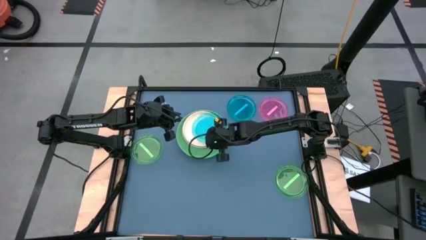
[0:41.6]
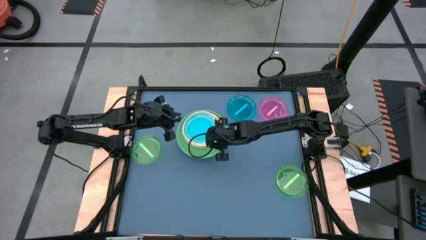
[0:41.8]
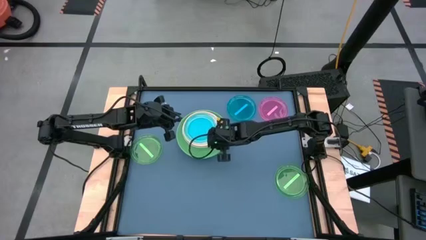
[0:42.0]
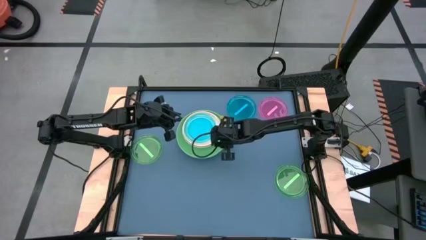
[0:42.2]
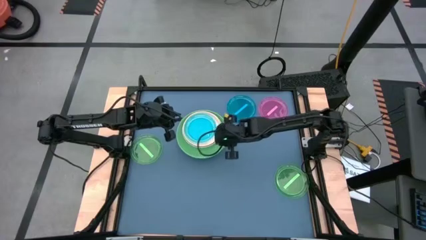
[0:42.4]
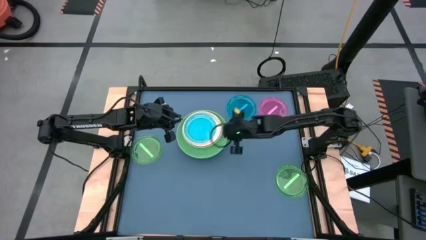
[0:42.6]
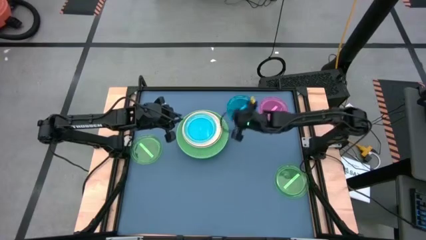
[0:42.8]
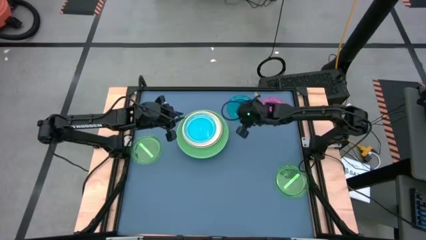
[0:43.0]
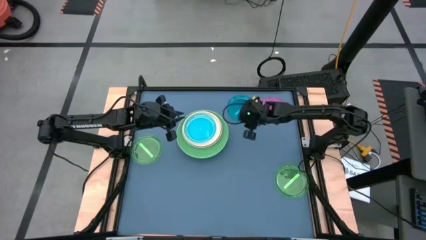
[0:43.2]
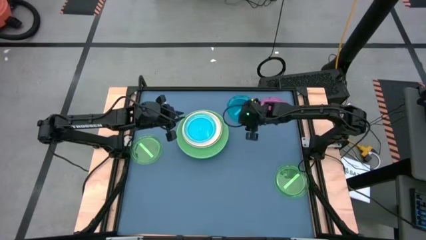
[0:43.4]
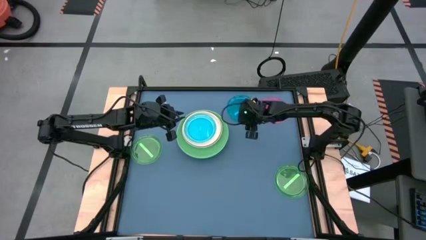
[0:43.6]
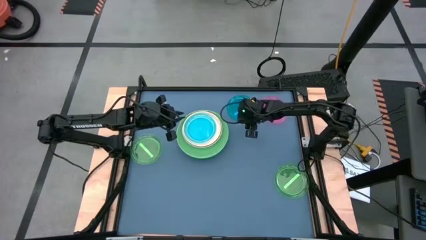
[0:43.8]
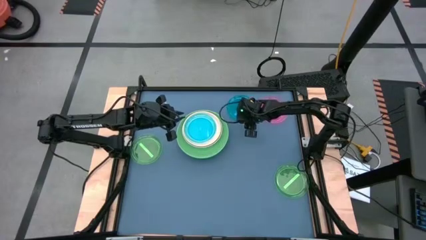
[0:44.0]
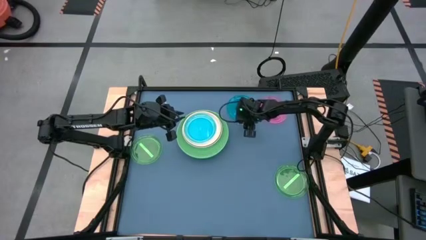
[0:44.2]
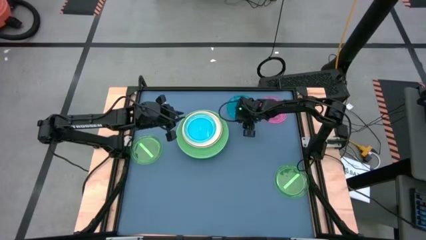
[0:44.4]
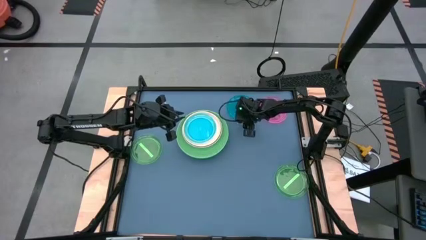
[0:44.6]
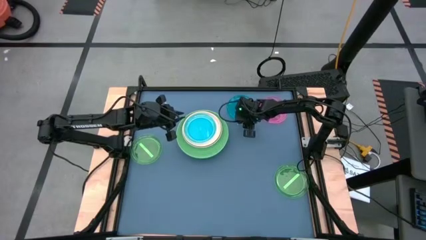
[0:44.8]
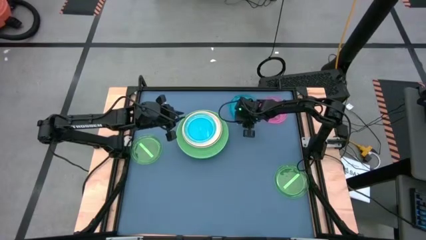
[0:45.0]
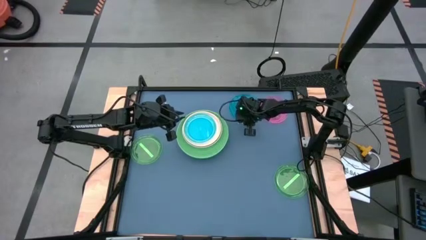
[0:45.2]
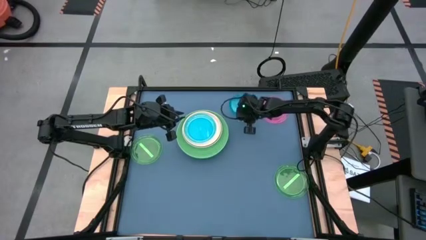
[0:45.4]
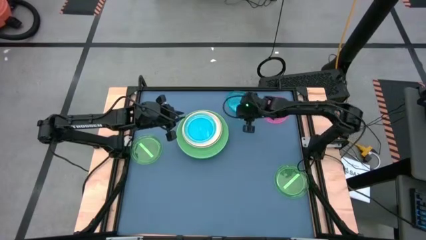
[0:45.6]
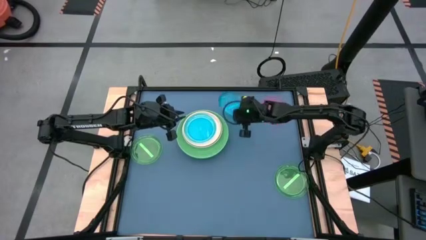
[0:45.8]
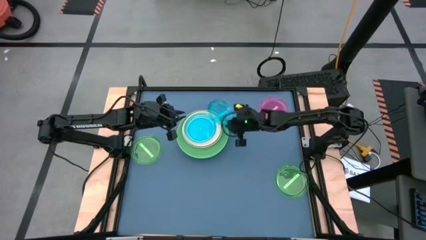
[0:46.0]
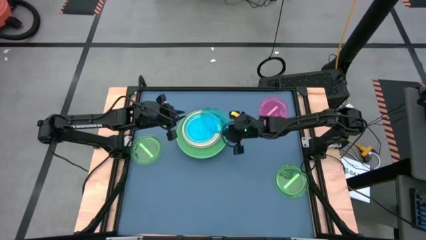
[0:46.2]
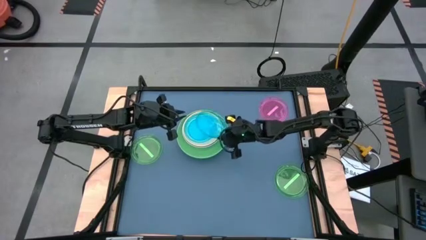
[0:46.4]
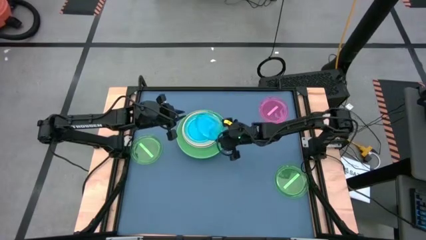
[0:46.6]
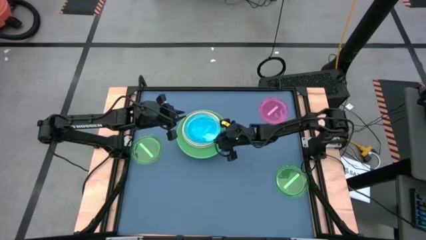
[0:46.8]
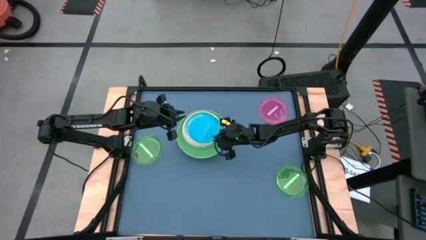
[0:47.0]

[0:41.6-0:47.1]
Task: Stack plastic plates
Stack the blue plate on top of the blue plate

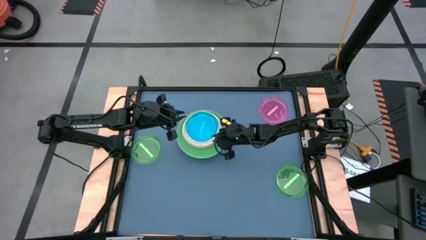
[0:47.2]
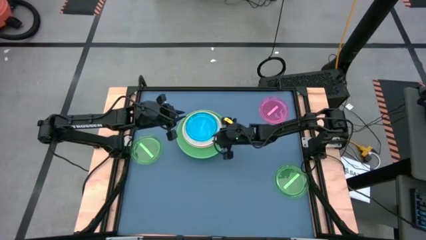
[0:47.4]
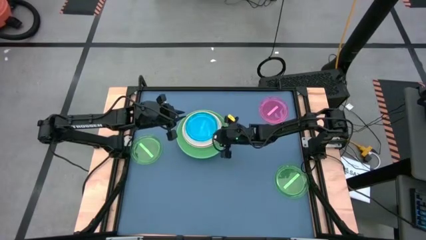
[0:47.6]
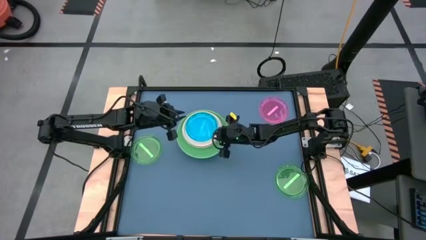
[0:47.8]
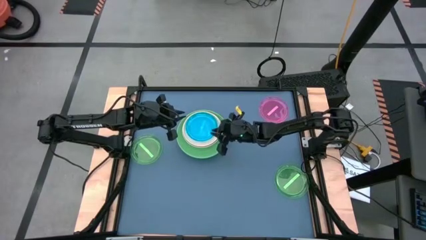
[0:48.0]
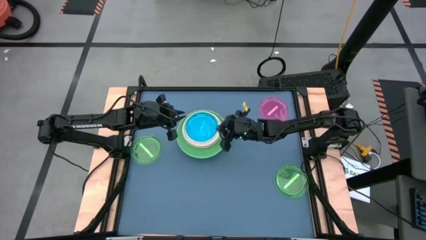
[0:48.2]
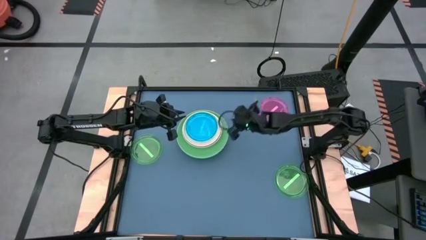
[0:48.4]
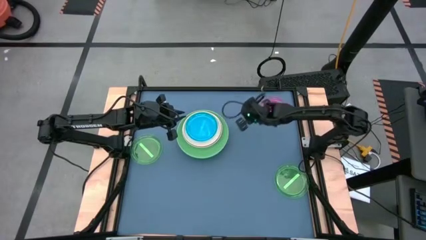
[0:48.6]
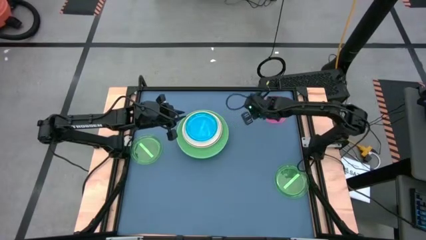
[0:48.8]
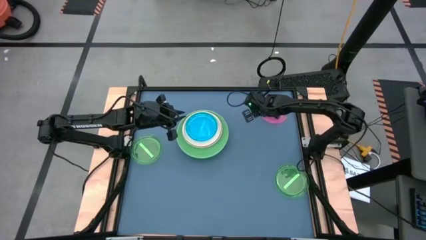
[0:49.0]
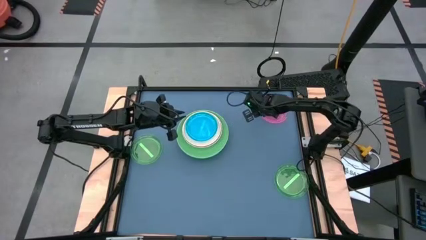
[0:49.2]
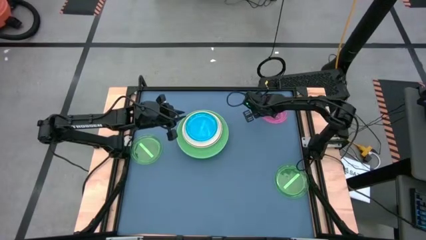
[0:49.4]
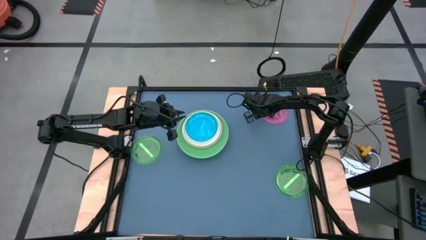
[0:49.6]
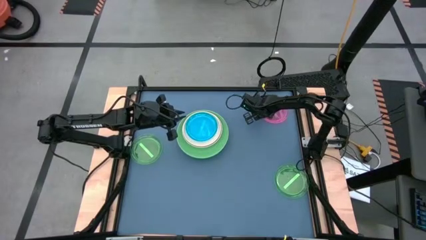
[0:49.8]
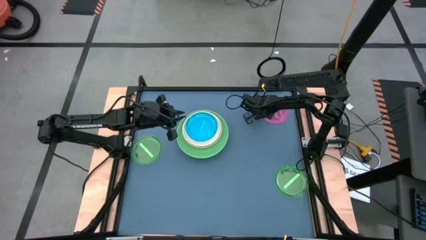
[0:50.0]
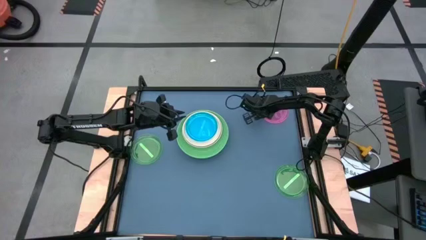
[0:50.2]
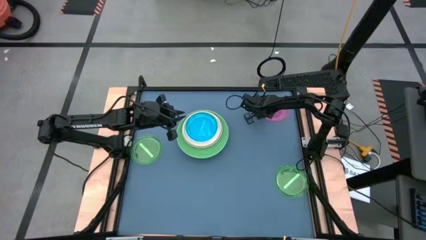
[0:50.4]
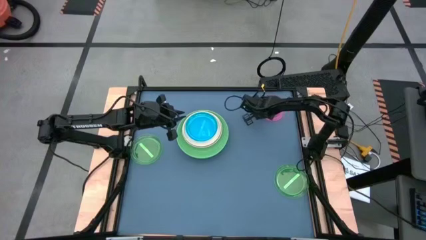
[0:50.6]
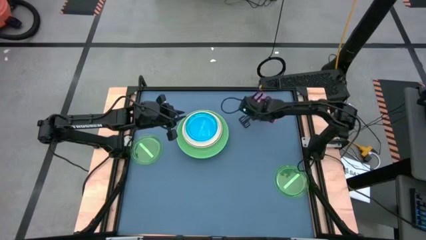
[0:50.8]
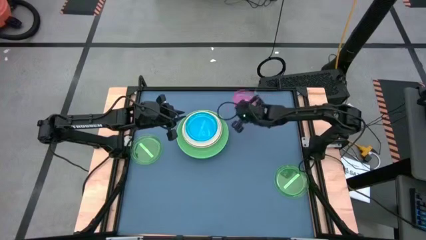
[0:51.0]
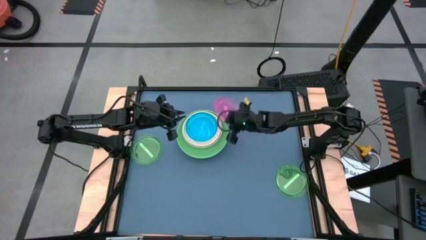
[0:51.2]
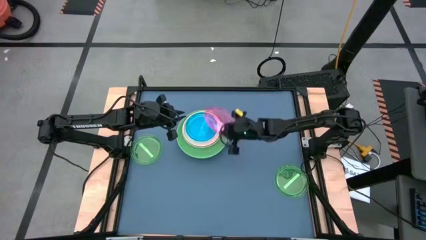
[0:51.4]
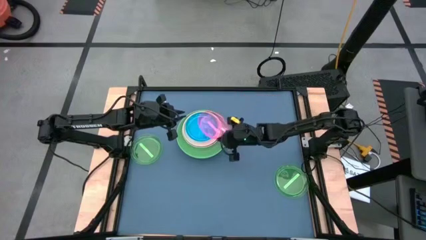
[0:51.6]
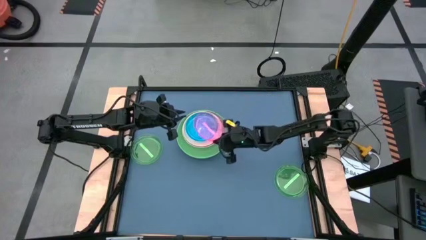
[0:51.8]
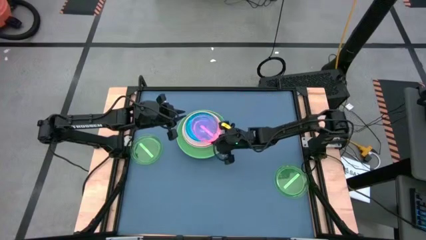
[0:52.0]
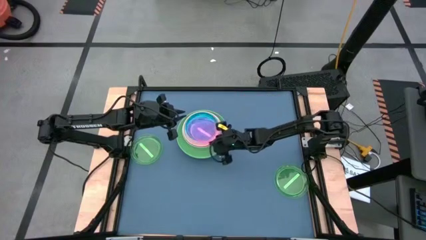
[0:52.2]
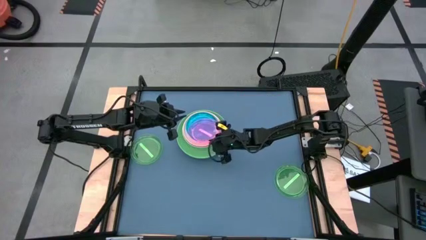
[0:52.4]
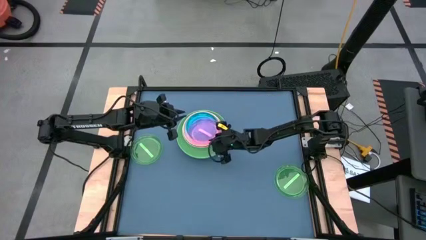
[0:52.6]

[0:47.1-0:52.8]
Stack the pink plate on the blue plate

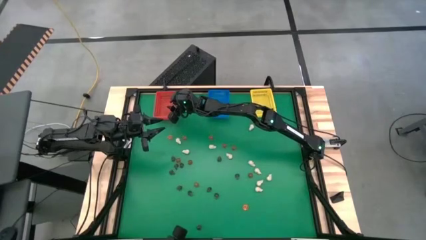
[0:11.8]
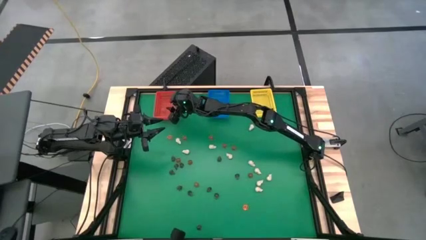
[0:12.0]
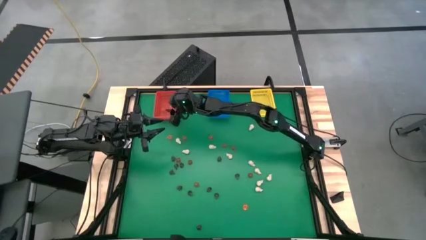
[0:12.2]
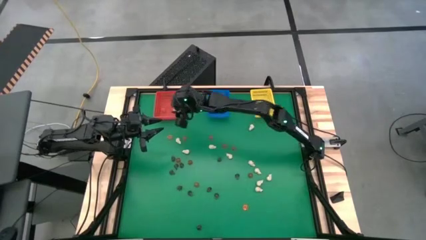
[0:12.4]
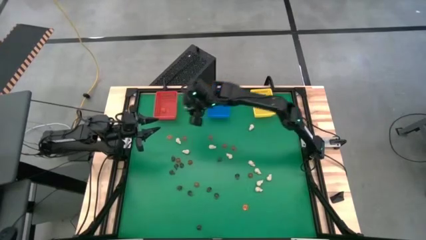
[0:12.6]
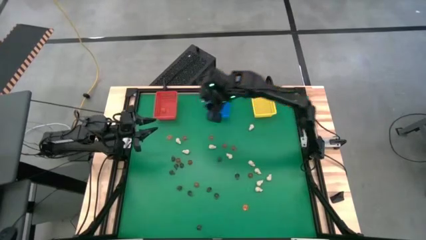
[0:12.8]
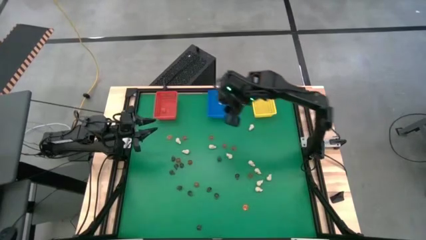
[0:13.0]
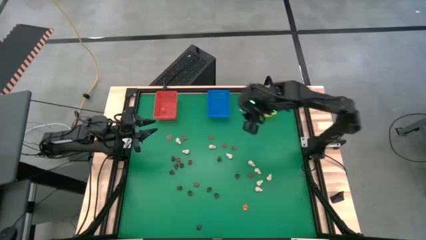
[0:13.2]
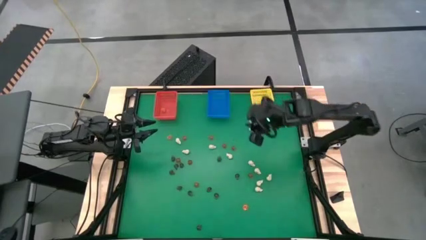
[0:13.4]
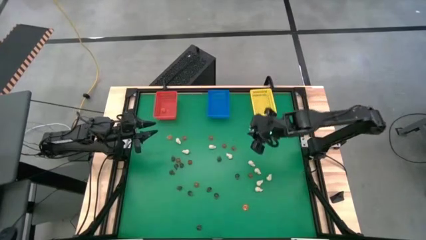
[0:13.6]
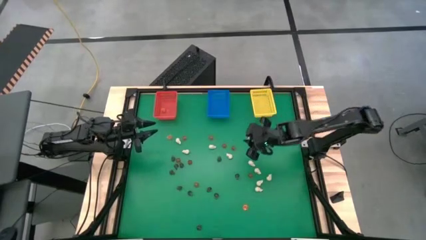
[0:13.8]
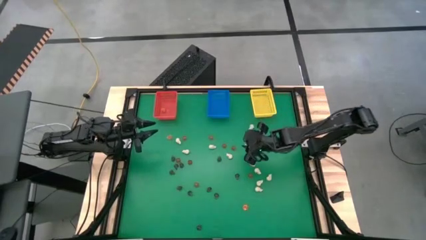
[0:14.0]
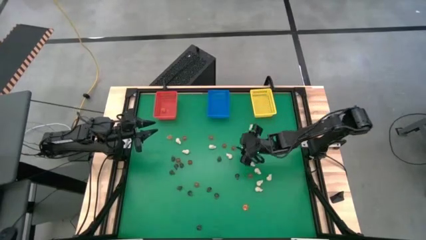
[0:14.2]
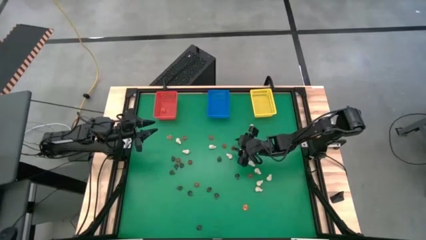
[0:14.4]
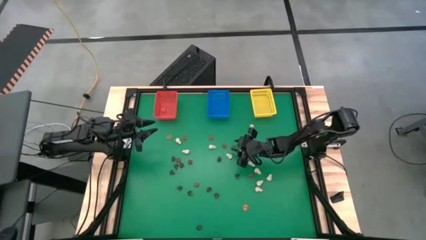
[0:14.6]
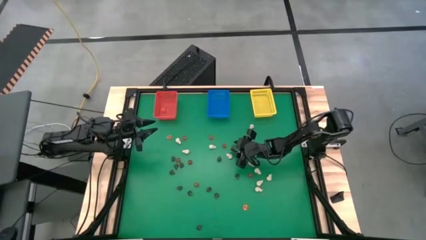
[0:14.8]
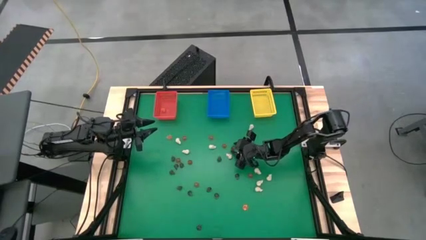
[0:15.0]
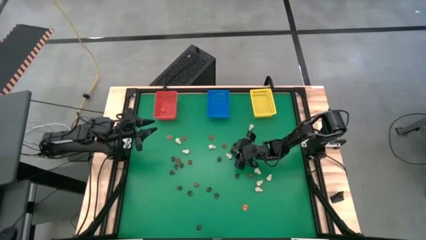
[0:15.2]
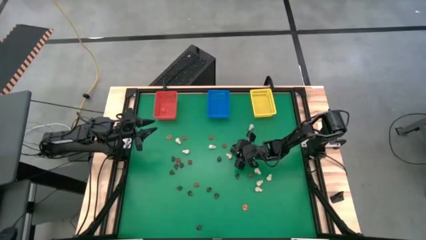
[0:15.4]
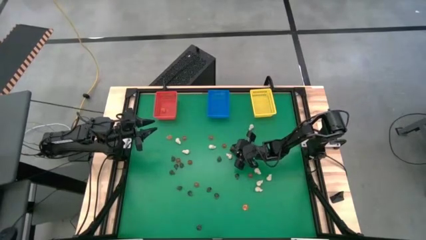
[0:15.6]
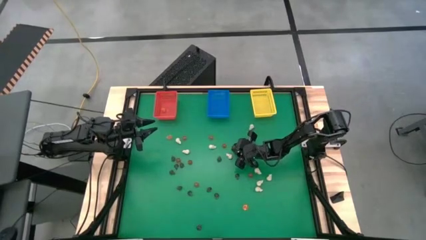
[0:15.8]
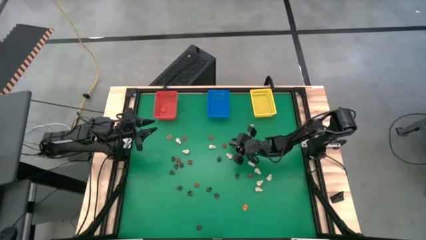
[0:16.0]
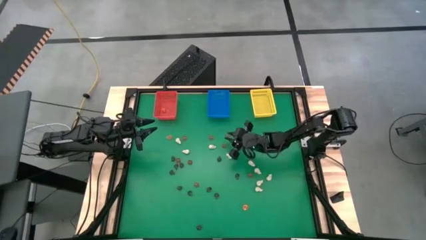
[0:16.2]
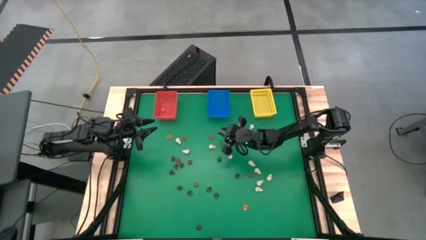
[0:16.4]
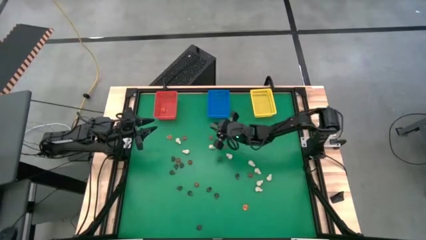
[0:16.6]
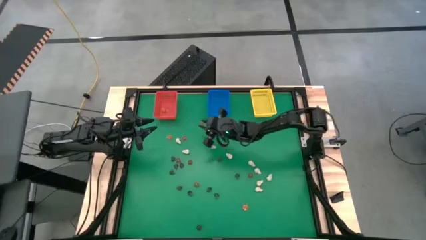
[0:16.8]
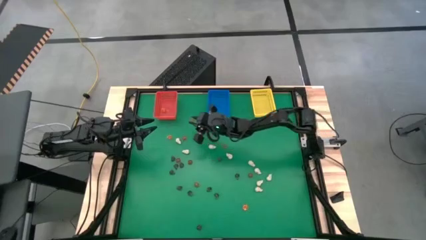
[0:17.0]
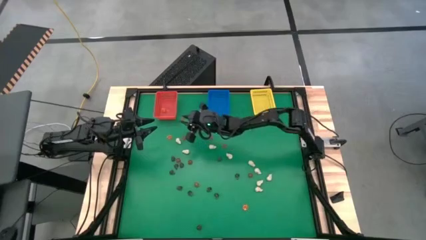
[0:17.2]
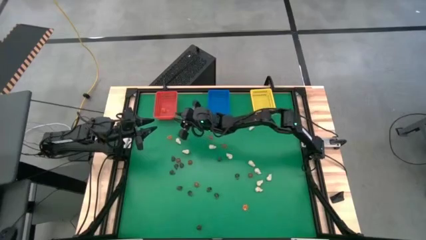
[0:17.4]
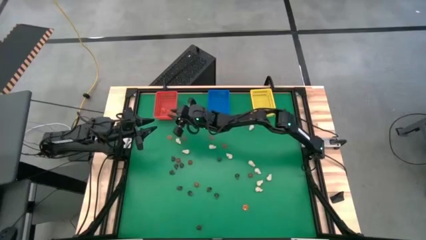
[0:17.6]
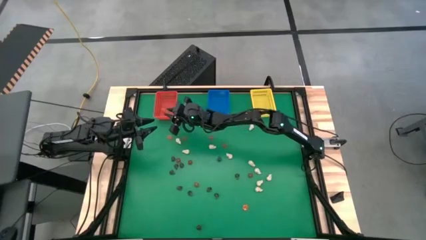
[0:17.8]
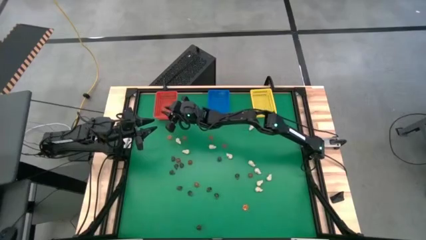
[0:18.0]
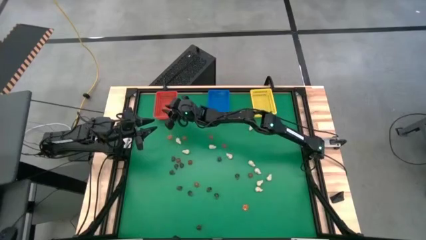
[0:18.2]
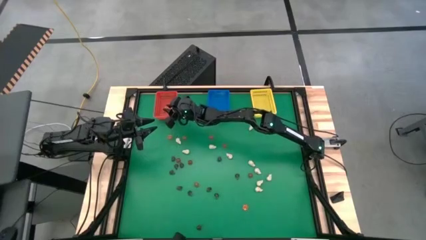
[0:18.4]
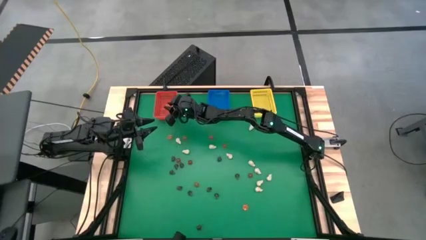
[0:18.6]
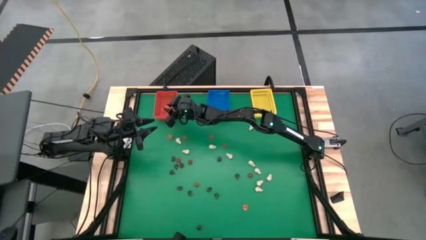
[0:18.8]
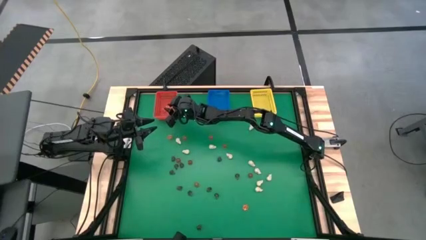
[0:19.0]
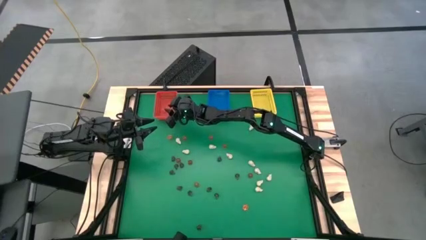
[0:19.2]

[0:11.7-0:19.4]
Task: Sort Halloween decoration
Put the orange pumpkin toy into the red bin
